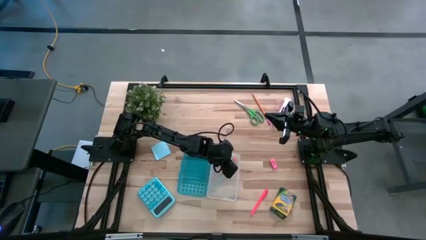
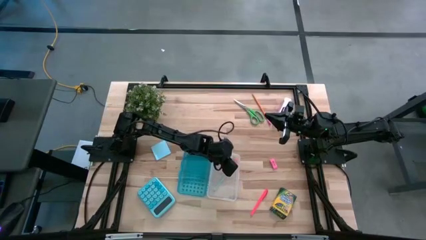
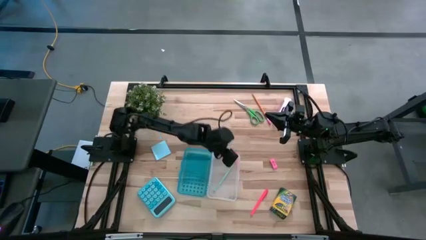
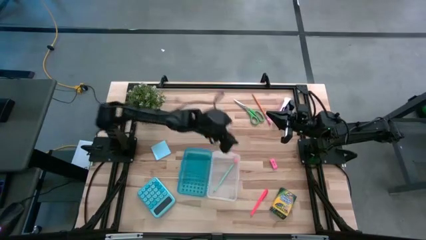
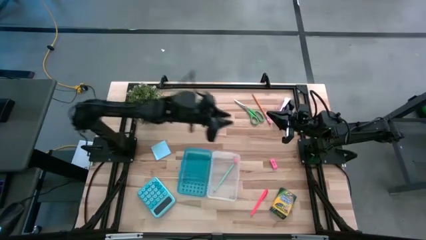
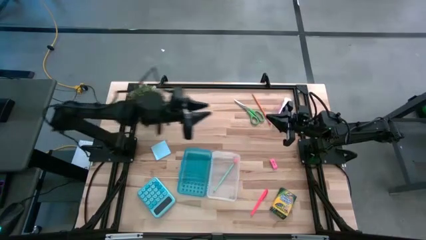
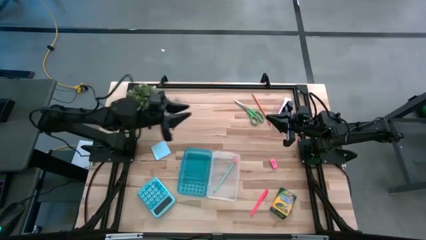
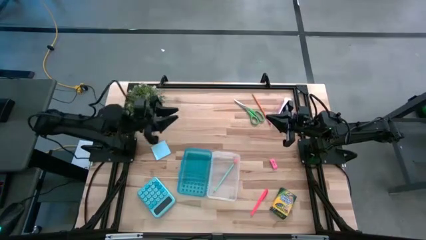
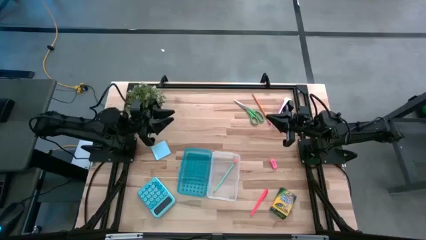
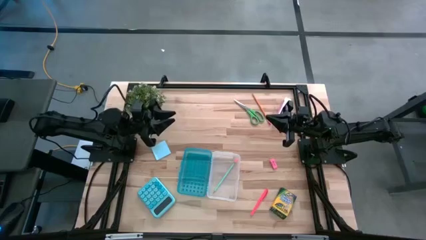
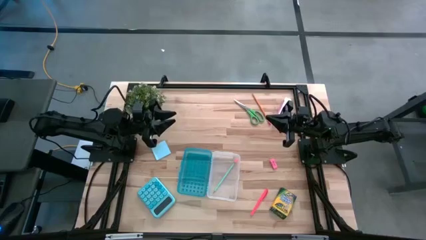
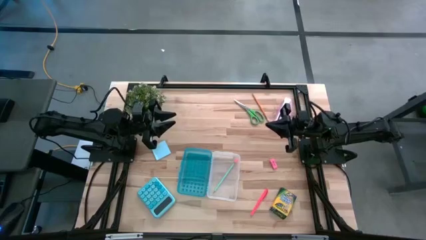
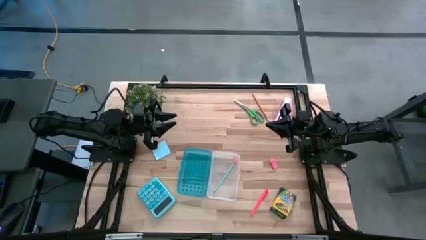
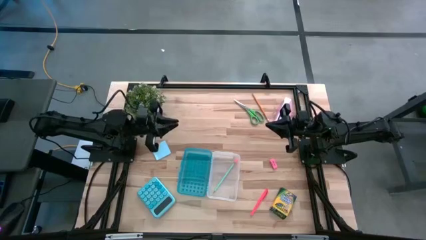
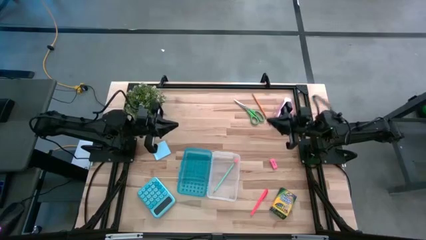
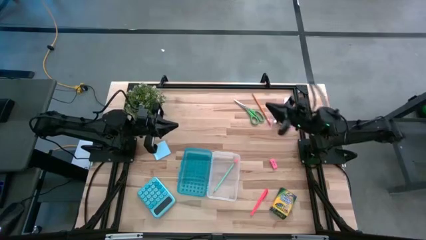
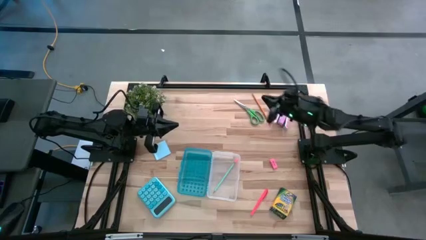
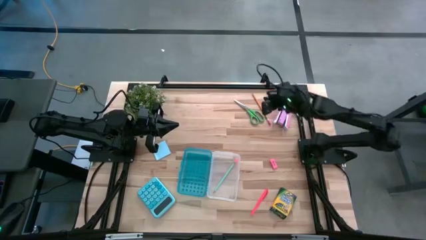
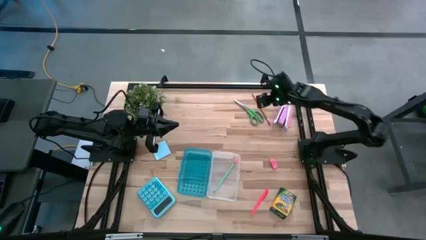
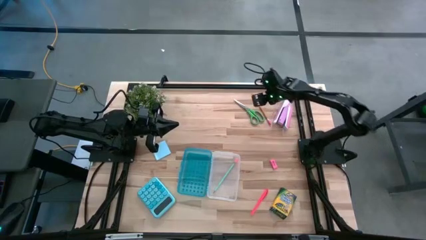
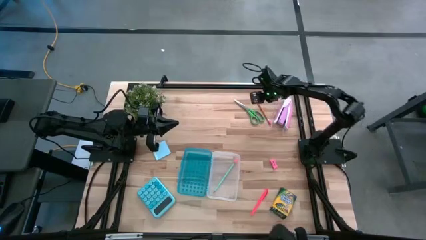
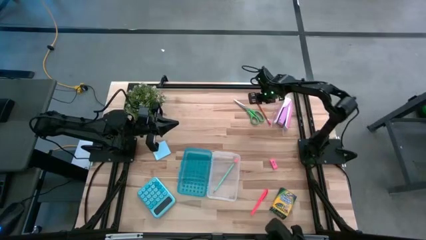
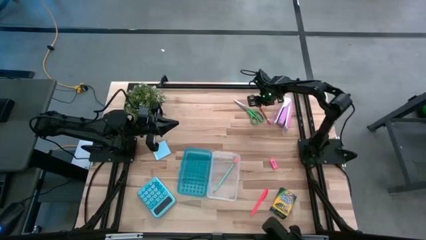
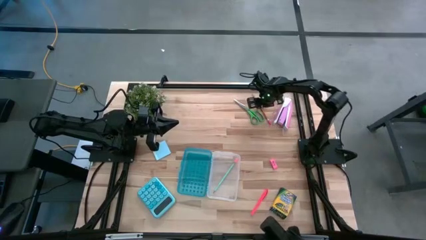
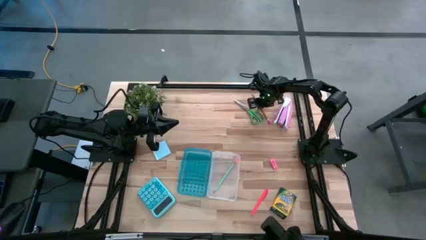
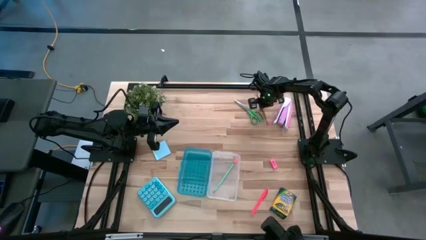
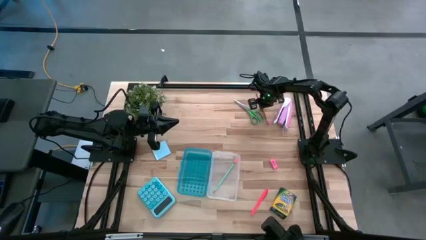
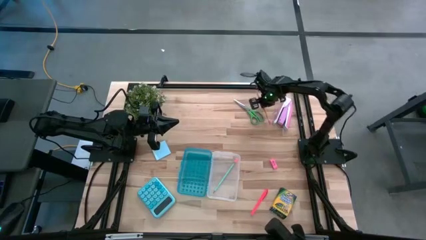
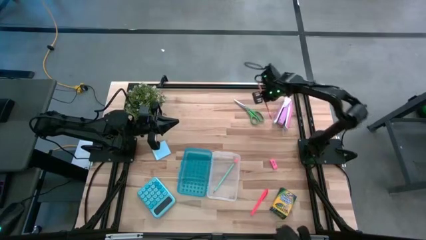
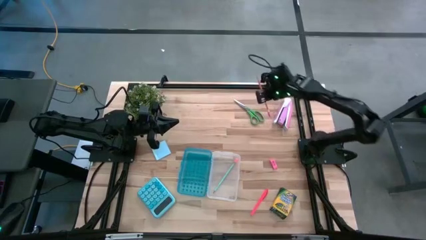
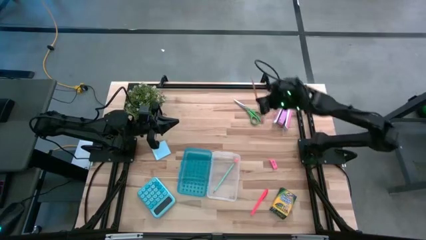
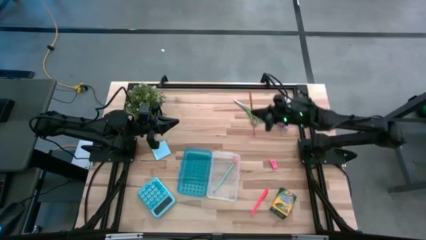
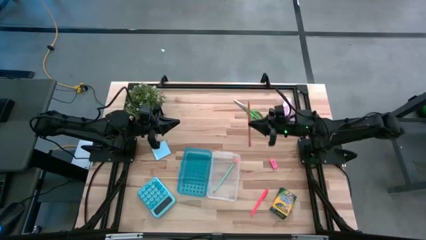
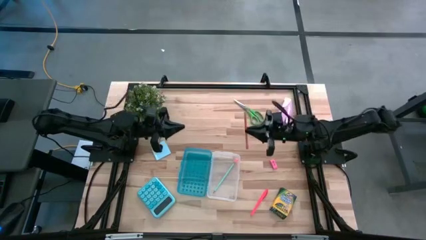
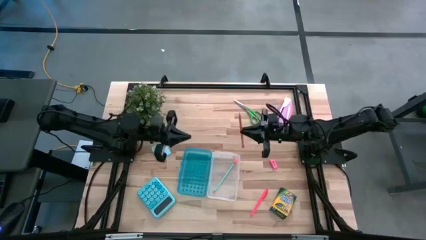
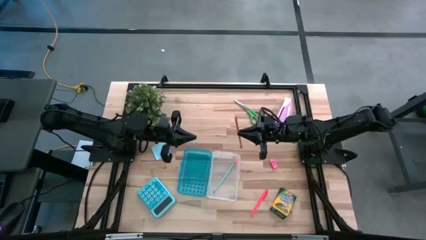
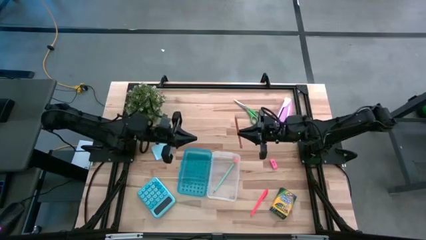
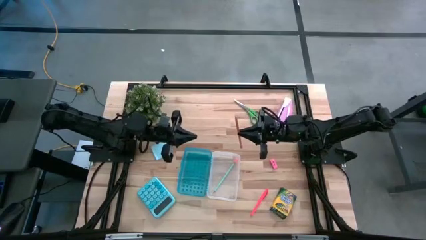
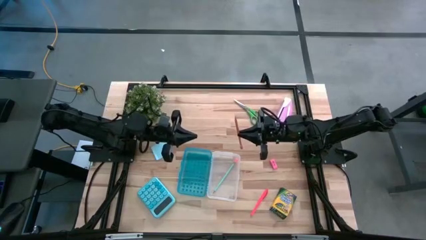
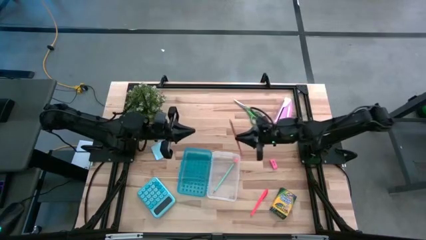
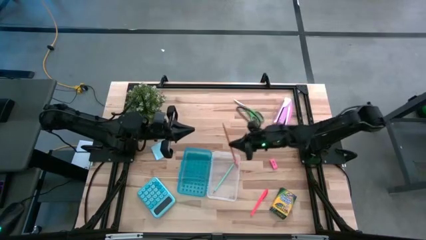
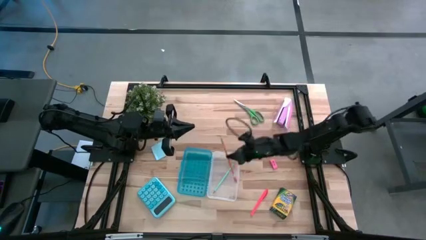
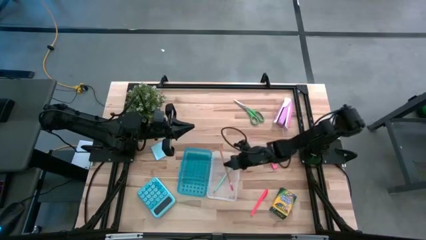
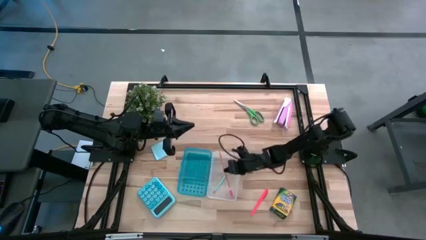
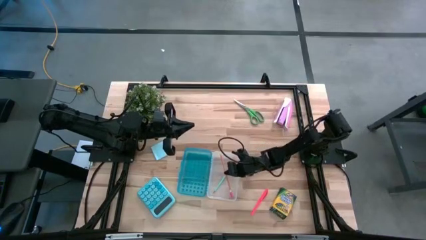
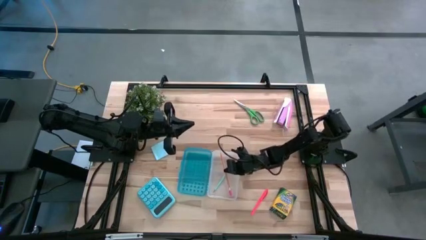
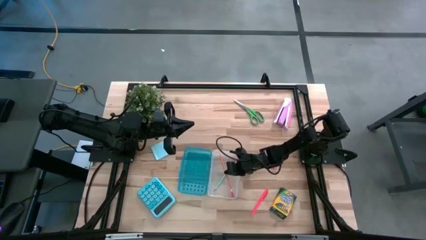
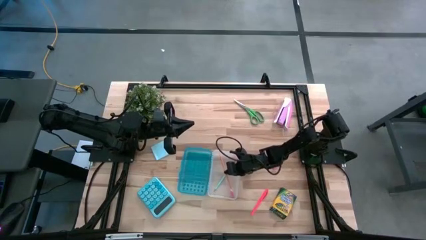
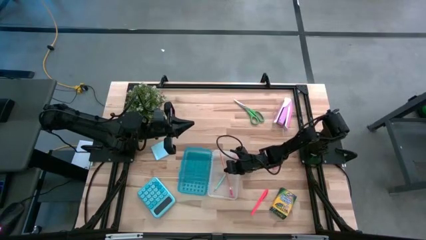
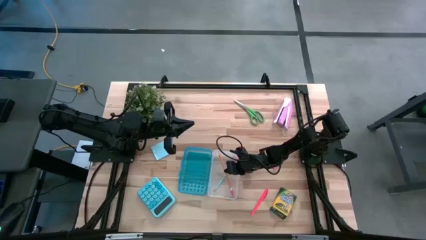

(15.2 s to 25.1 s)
Task: Pack school essentials
Put the yellow pencil into the blue supply box

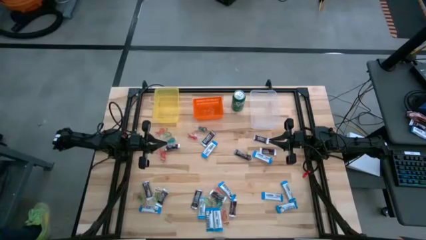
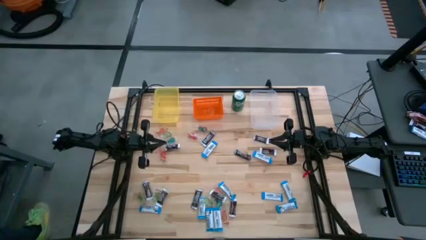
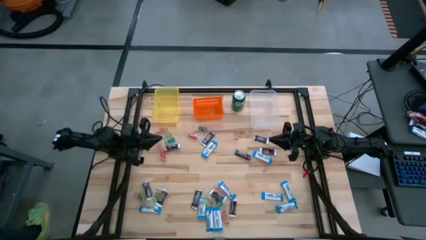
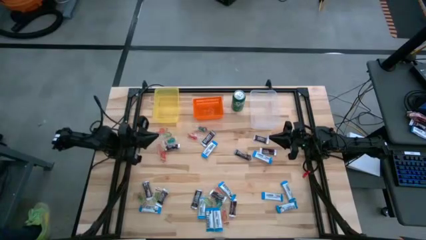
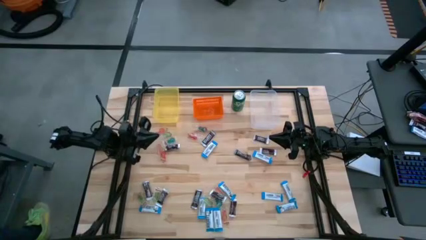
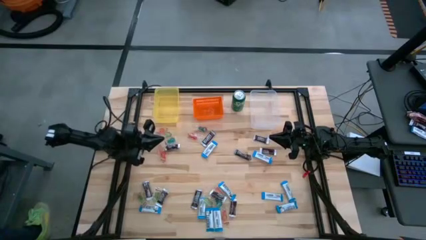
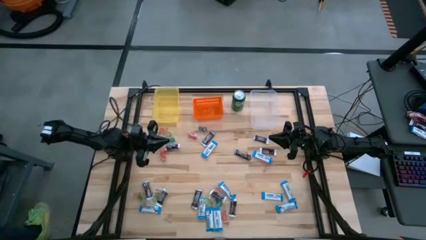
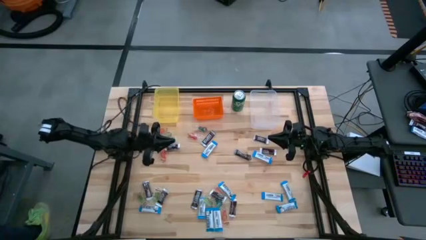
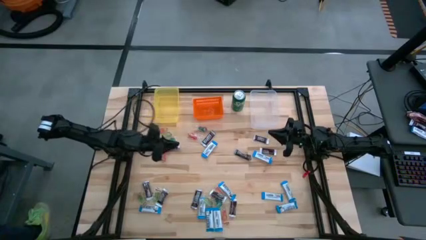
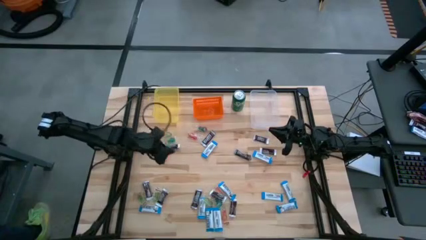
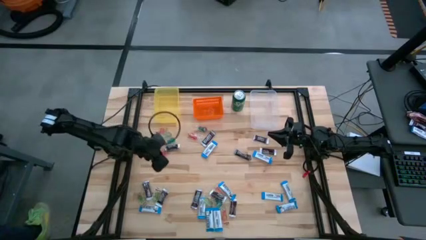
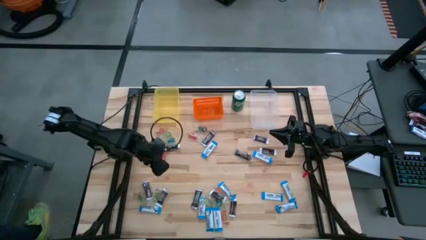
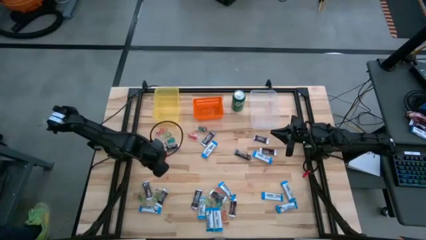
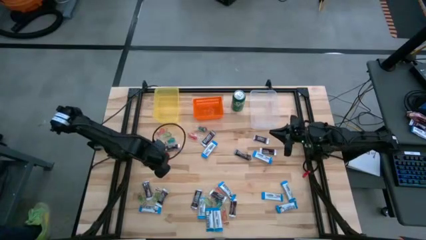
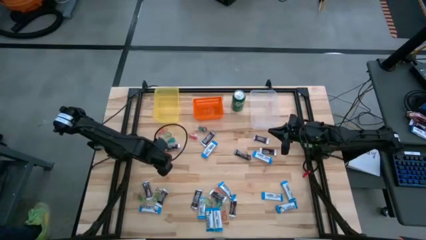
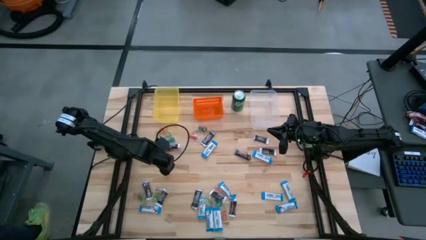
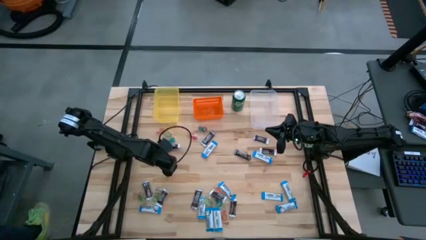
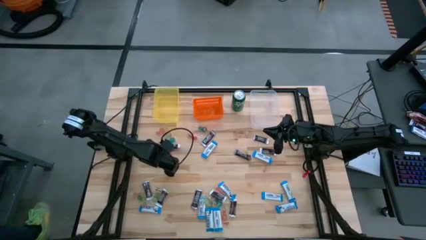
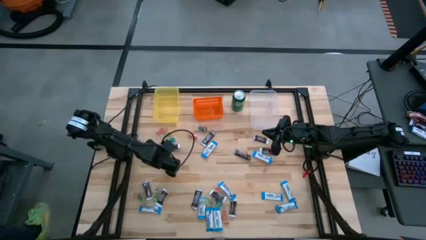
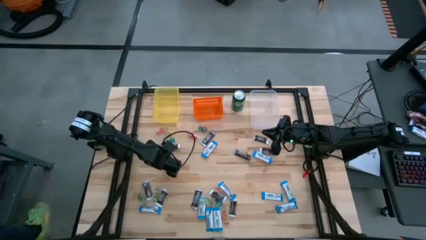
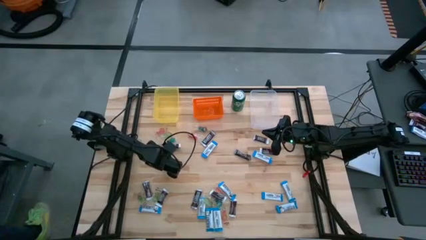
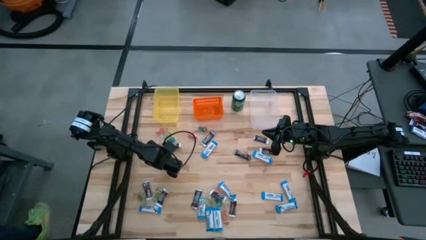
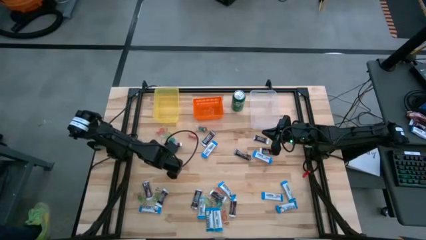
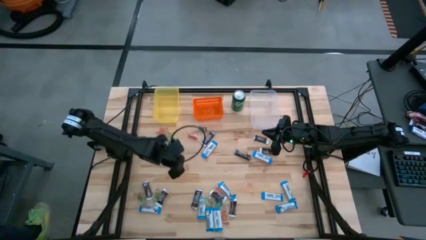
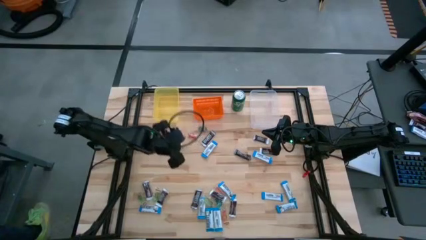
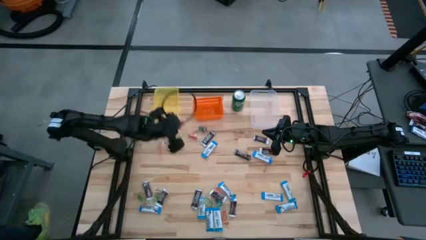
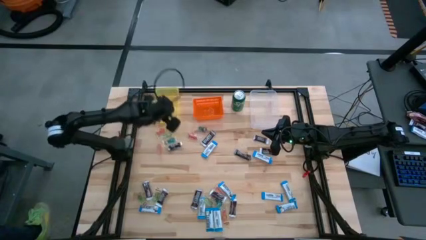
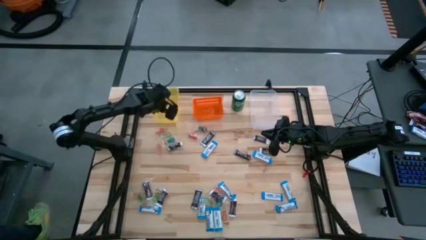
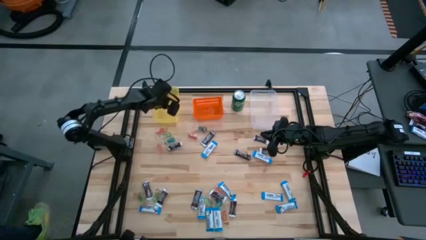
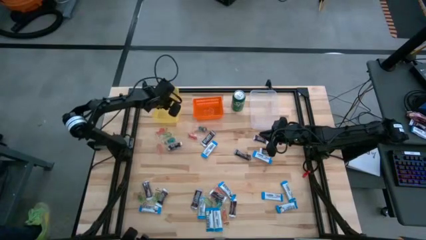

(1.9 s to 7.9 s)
Task: Organize candy in baskets
Put the red gummy into the yellow bin
